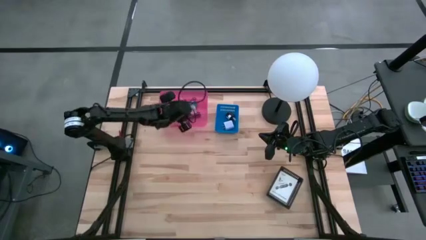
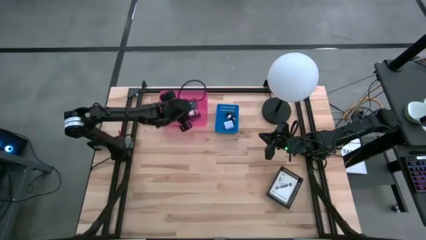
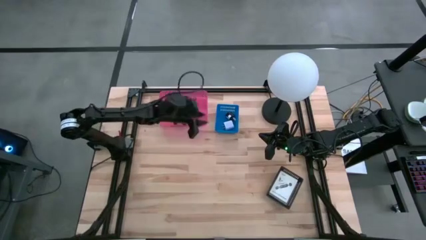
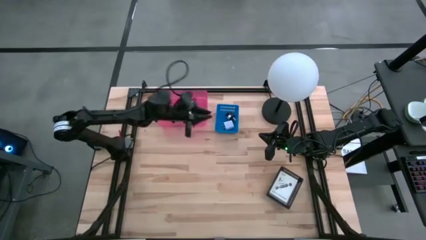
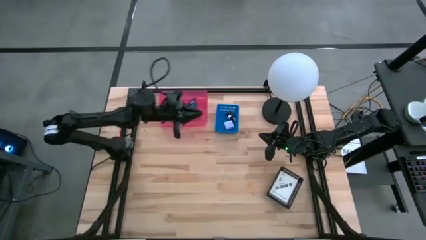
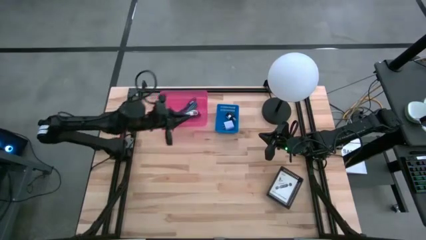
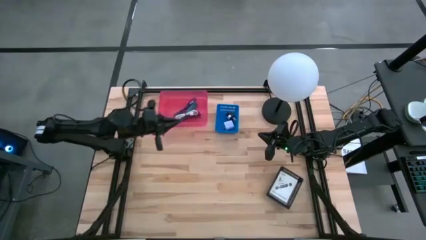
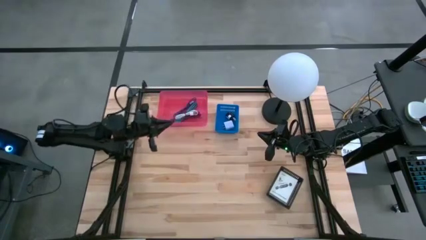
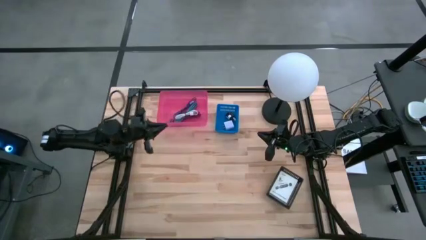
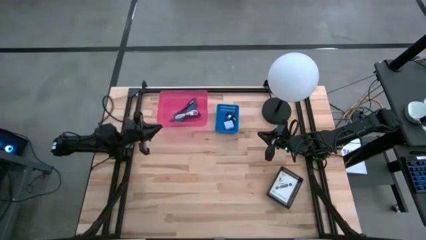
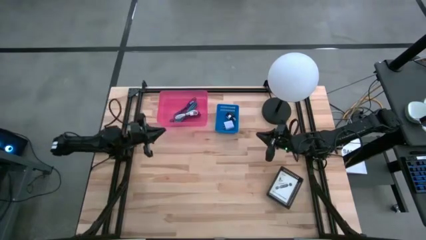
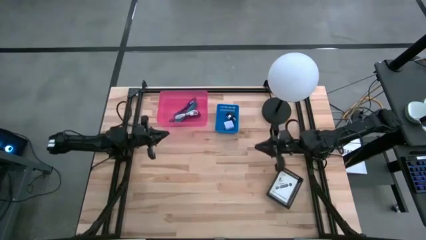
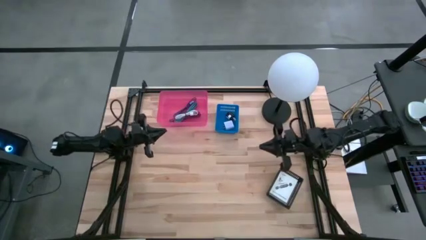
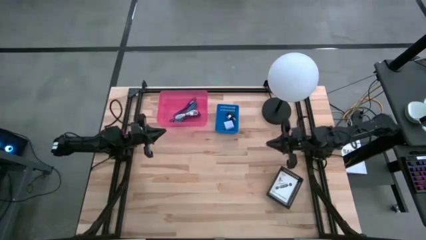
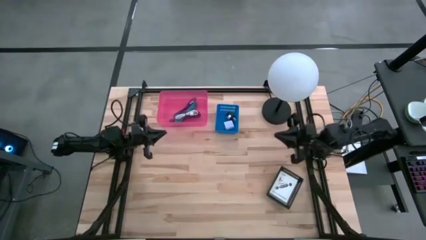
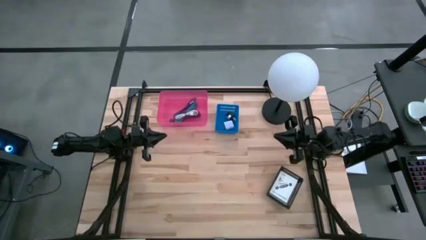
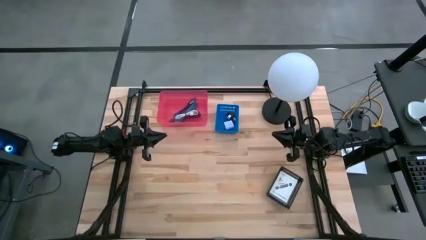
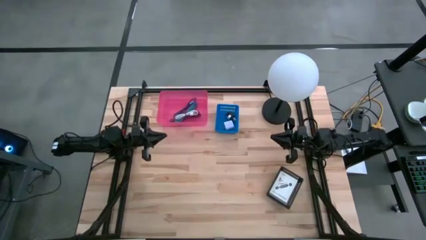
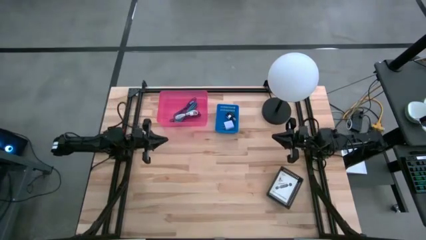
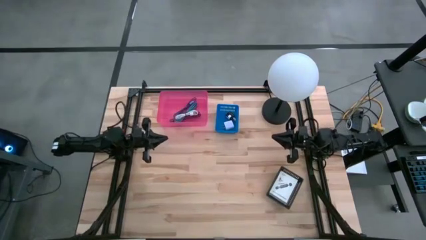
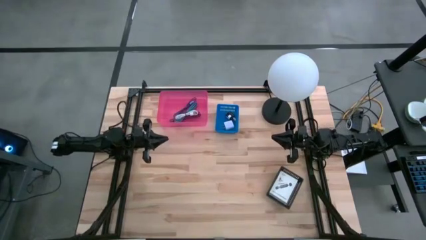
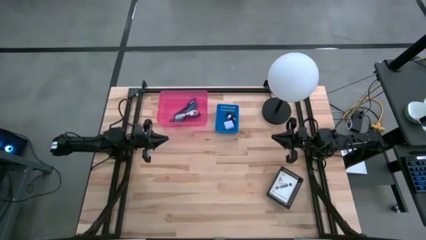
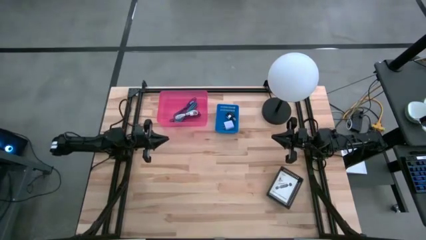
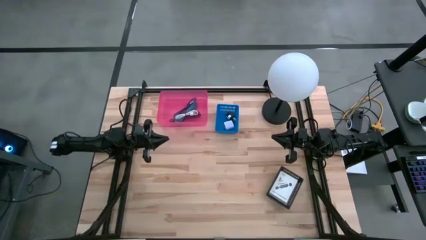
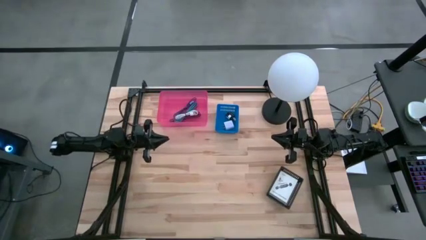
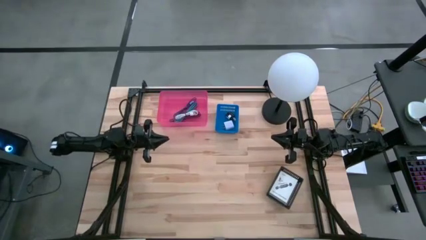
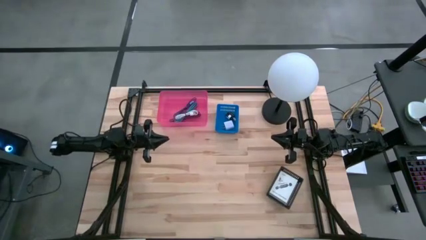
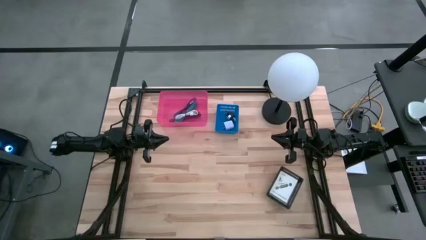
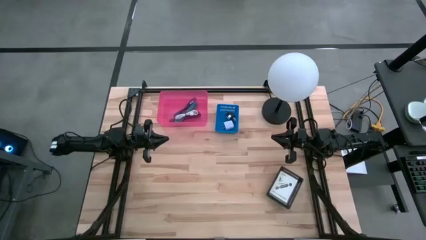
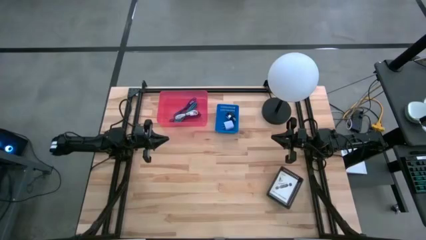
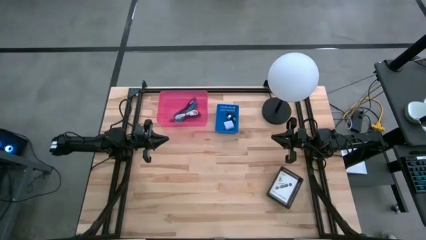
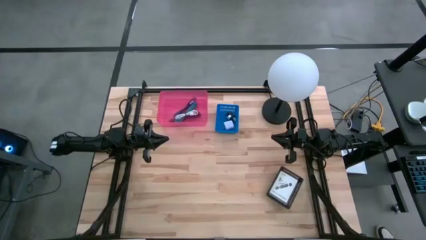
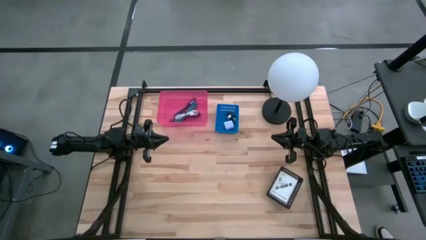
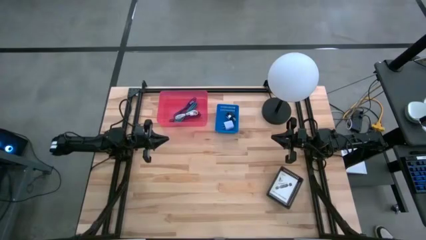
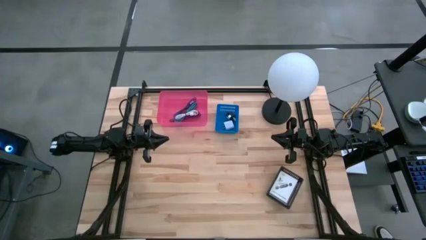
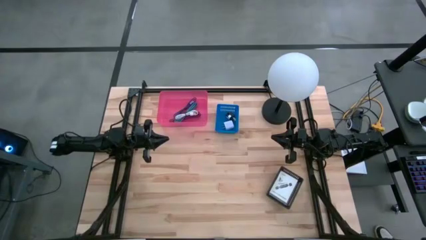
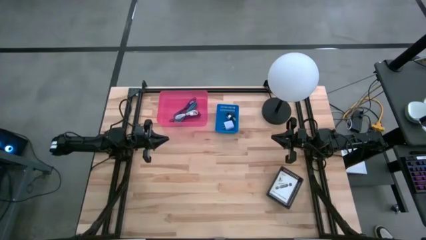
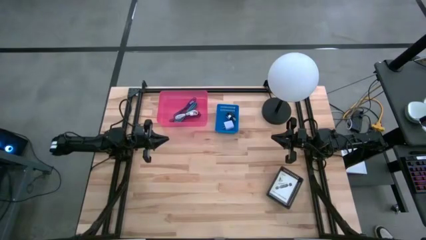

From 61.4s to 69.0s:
Task: Pick and place items into bin
Return to Home Position

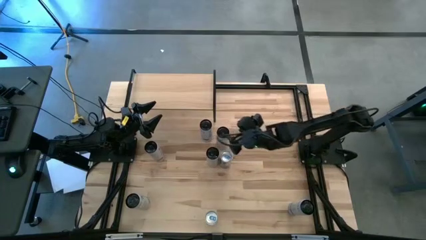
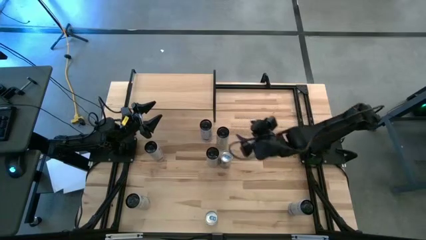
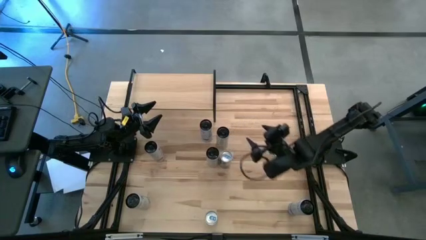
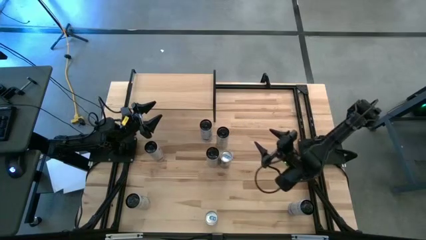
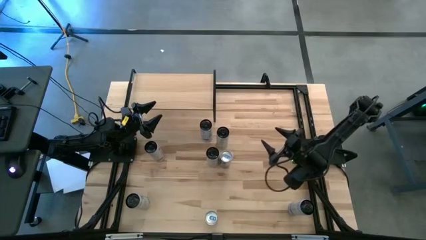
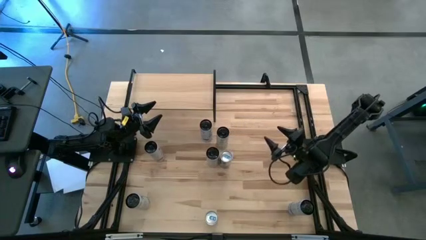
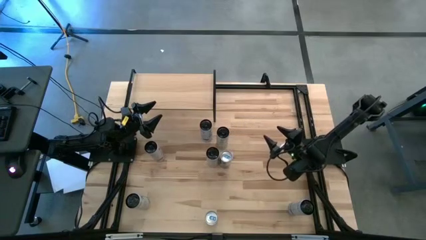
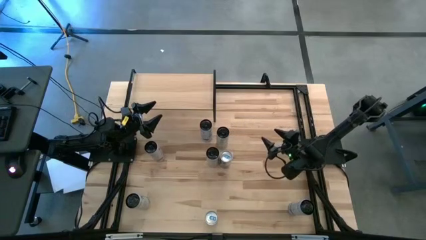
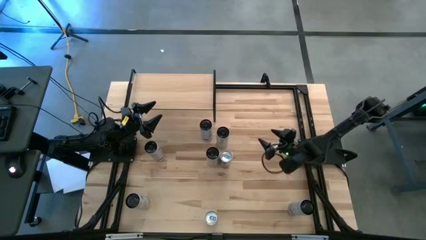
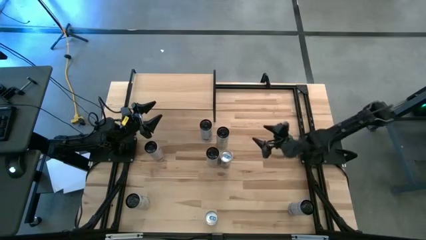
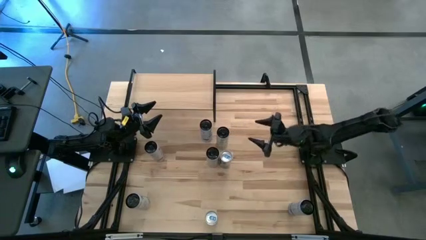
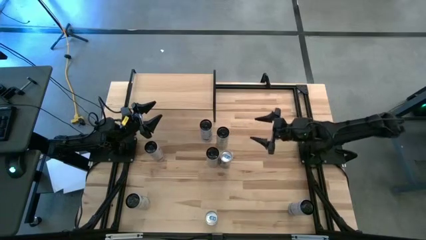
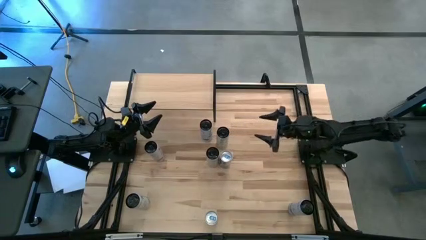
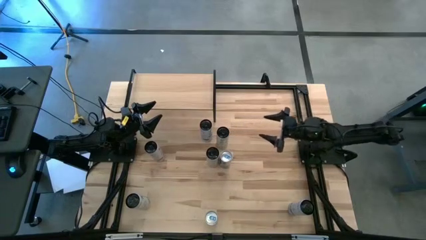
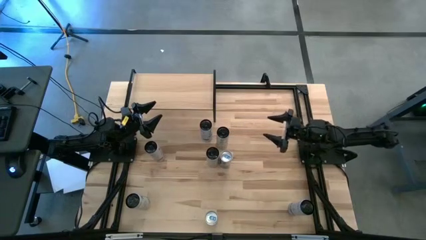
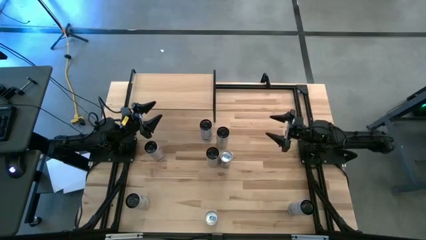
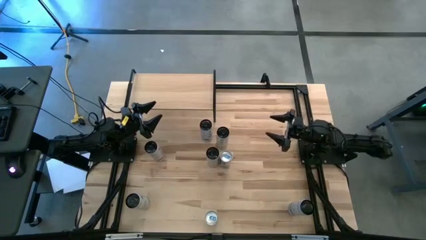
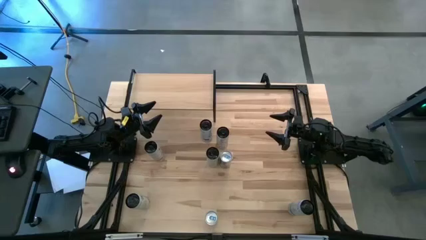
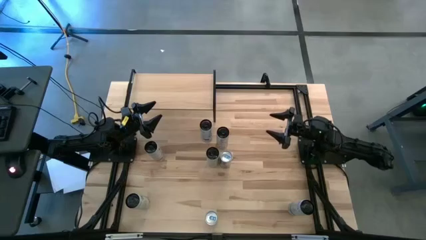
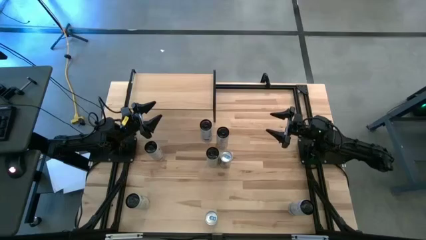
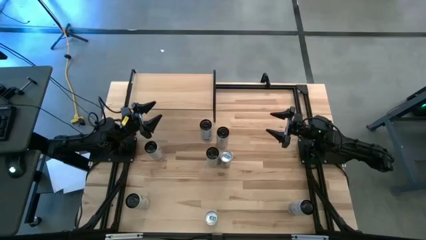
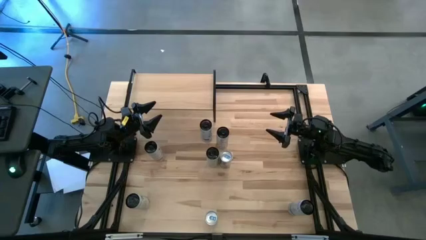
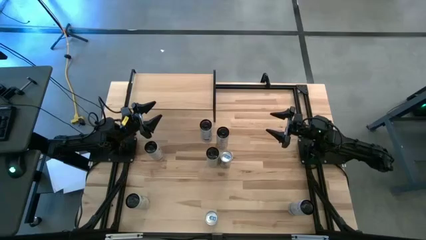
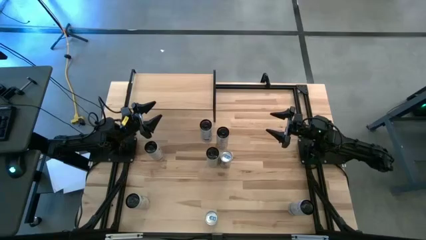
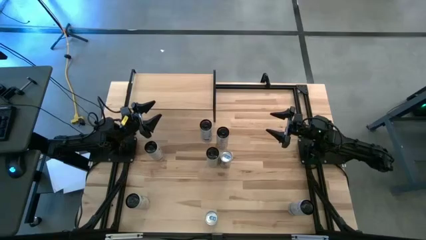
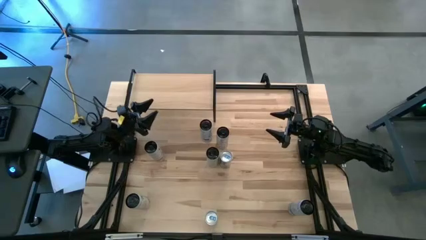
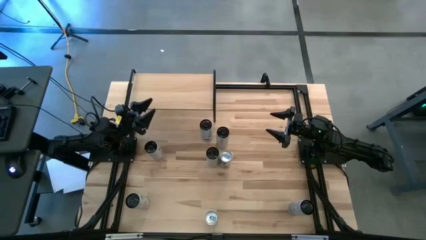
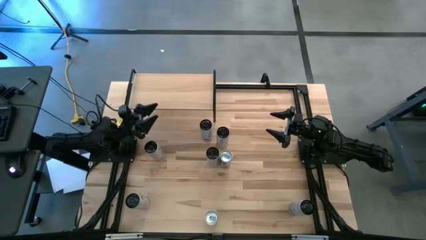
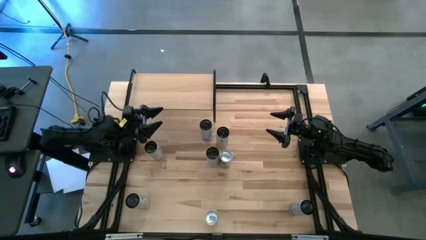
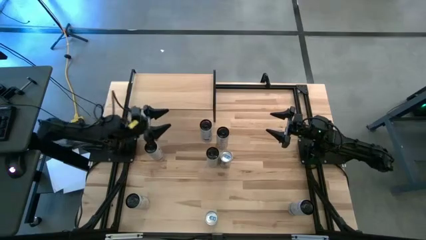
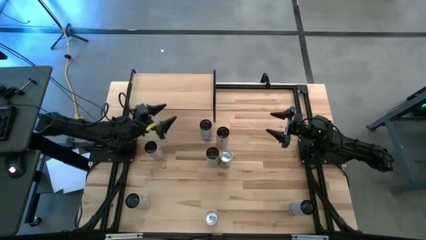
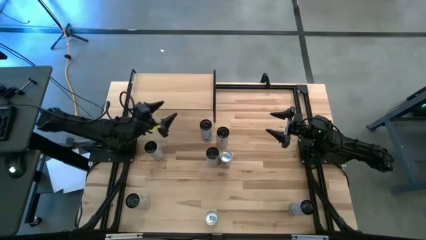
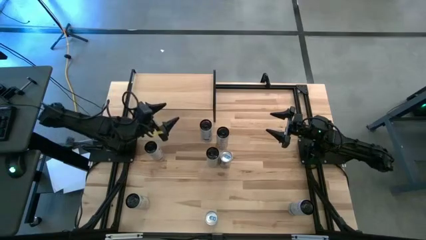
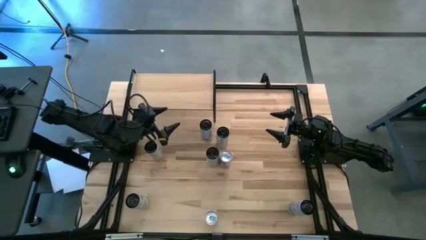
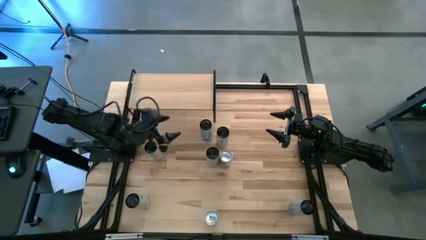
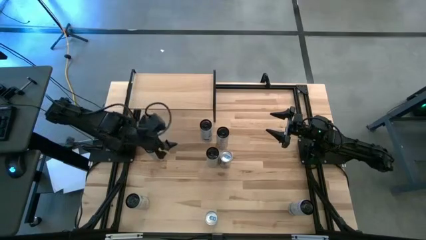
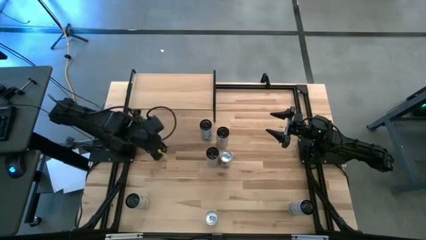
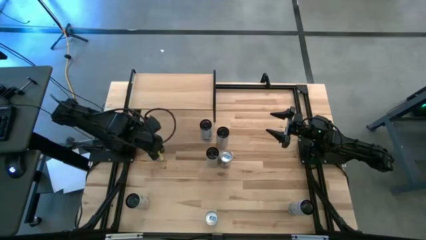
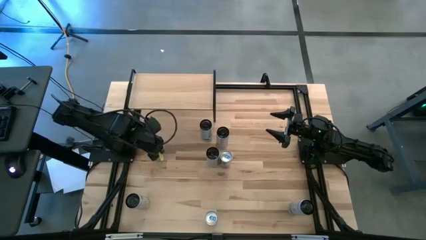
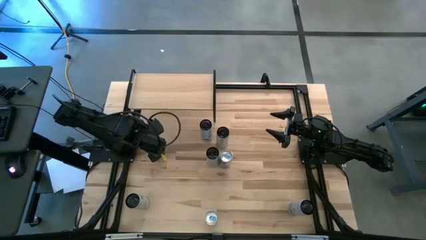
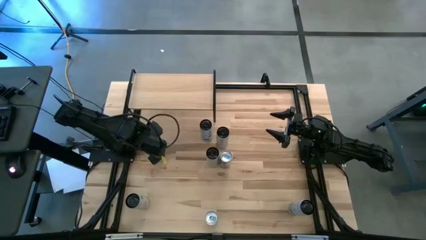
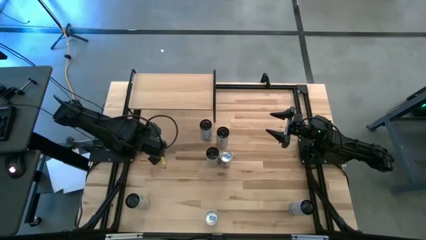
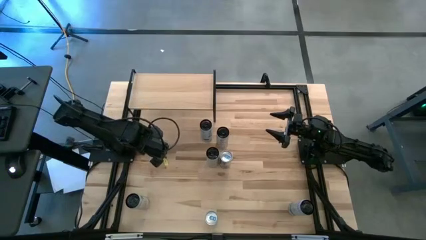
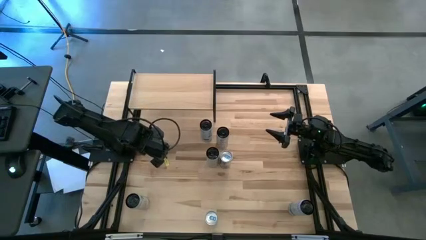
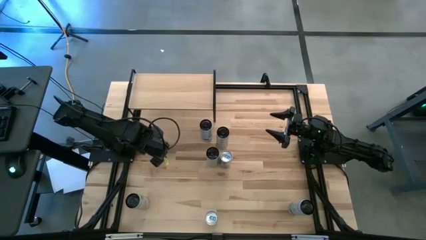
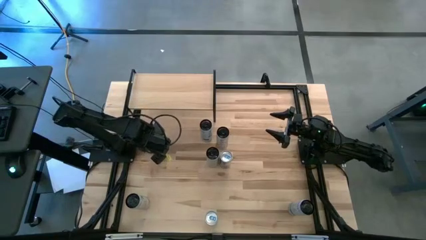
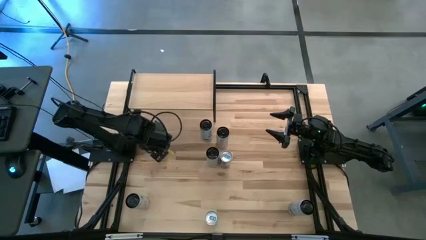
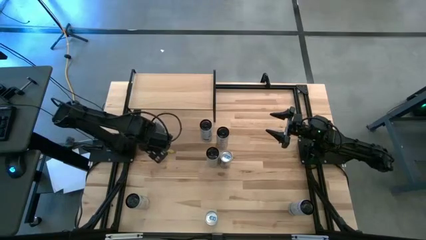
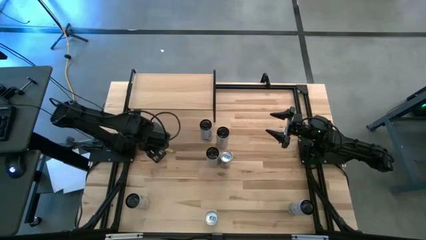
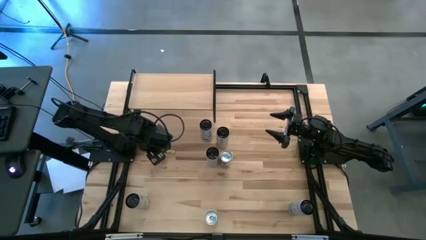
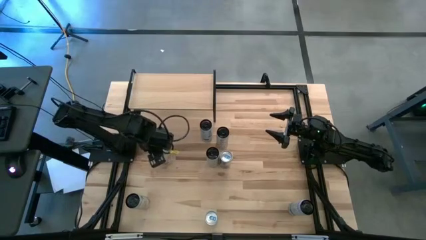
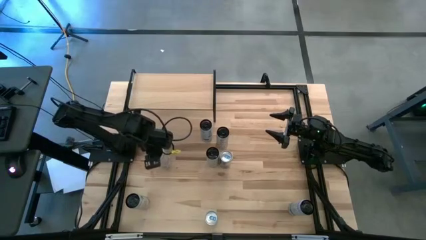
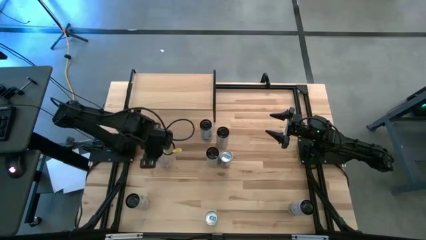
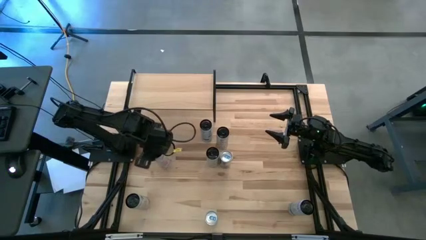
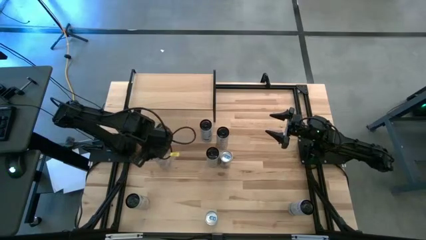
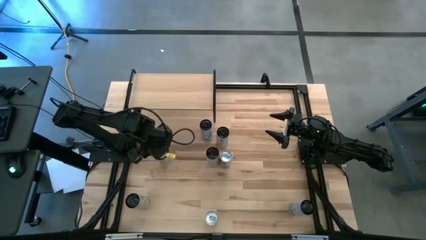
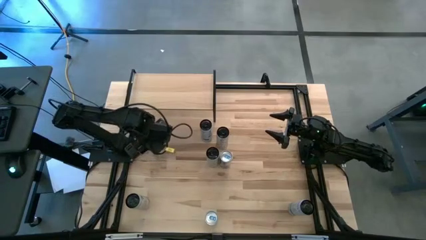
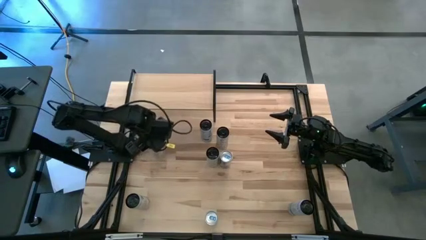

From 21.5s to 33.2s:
Task: Place canned beverage on shelf
Put the top white pink soda can on the shelf
